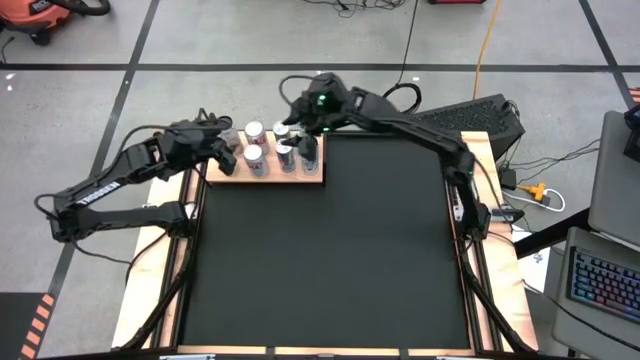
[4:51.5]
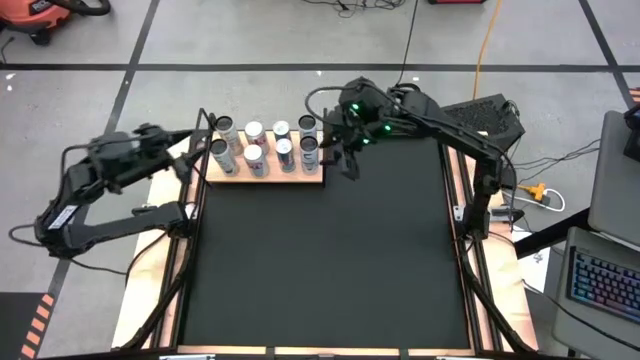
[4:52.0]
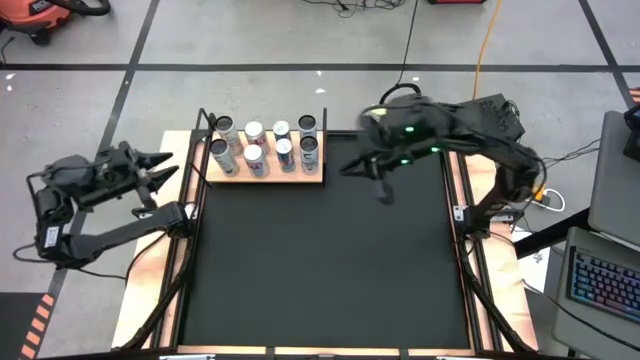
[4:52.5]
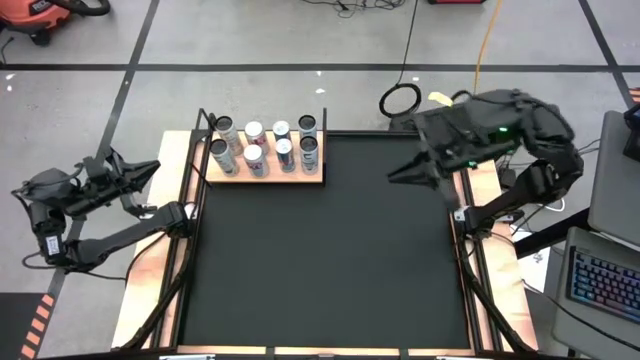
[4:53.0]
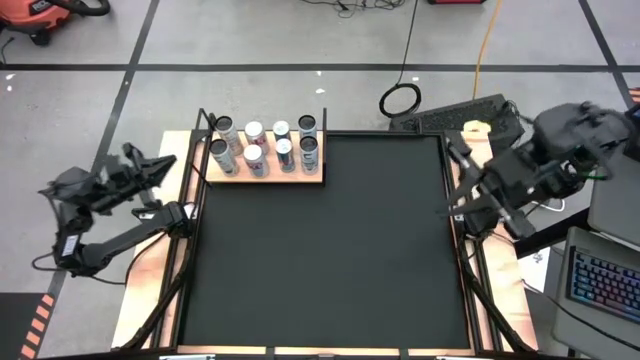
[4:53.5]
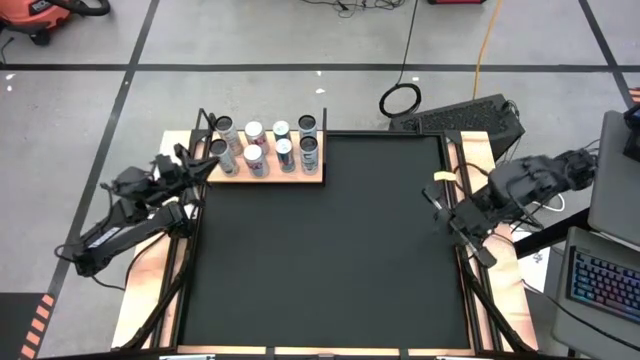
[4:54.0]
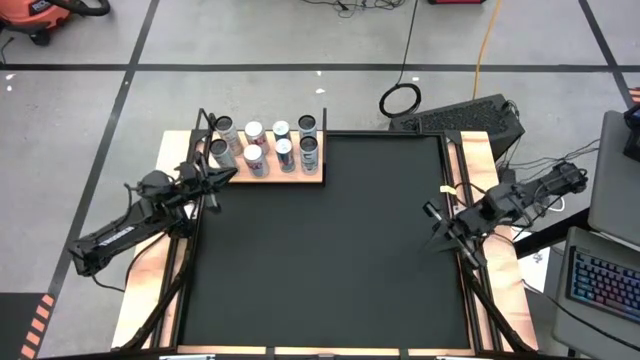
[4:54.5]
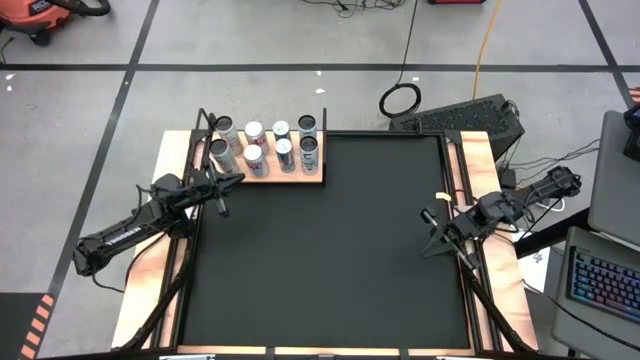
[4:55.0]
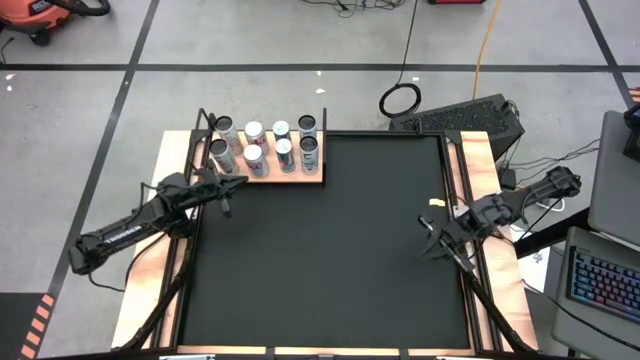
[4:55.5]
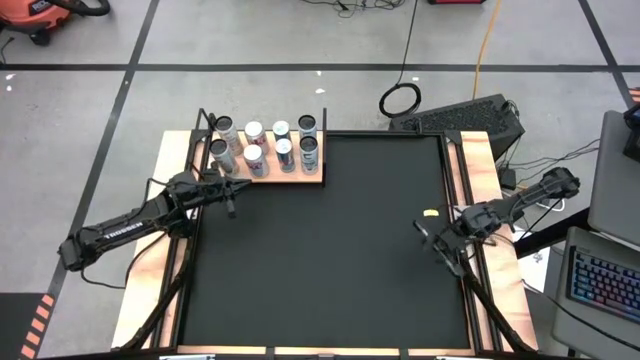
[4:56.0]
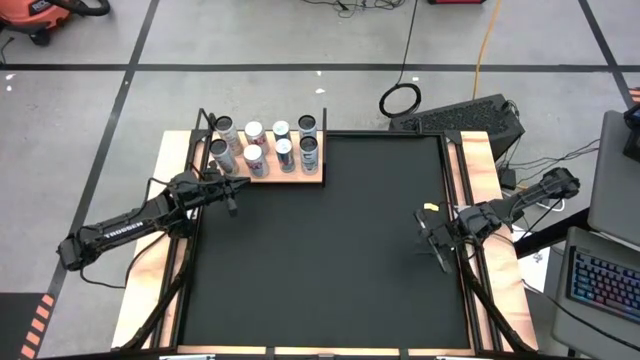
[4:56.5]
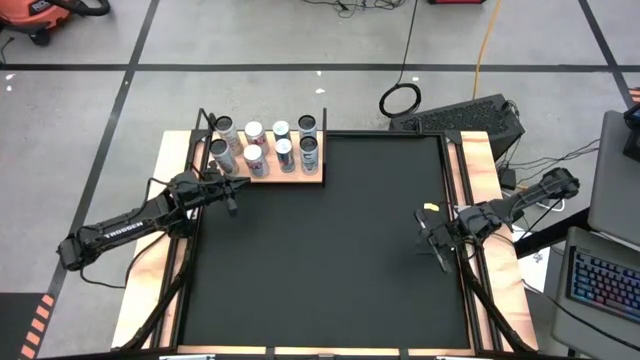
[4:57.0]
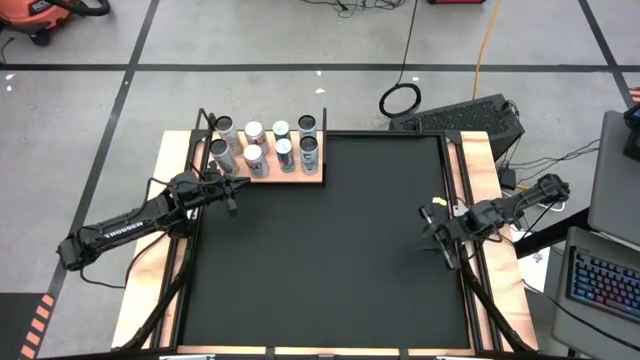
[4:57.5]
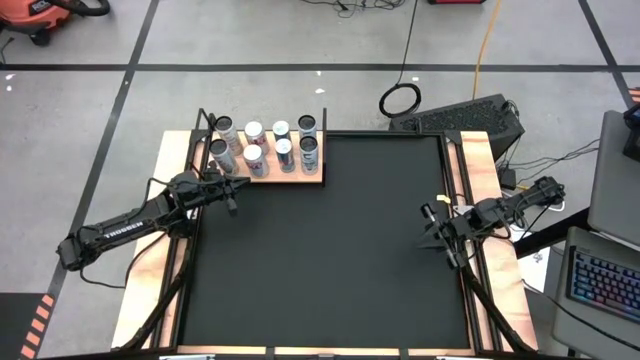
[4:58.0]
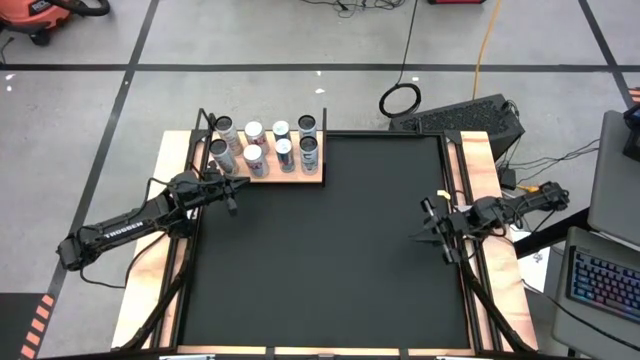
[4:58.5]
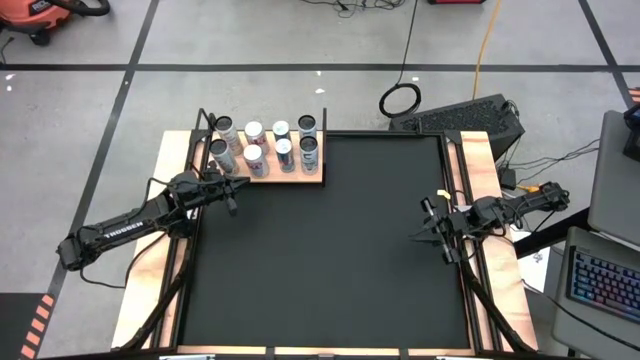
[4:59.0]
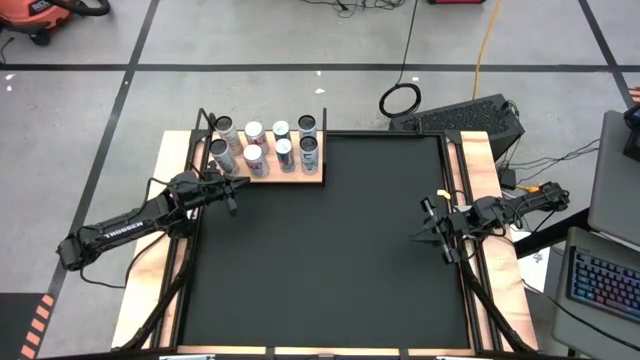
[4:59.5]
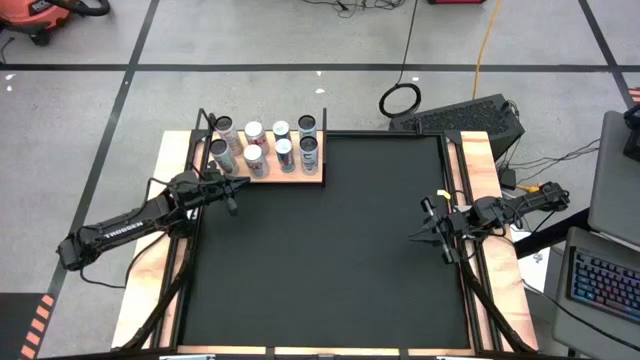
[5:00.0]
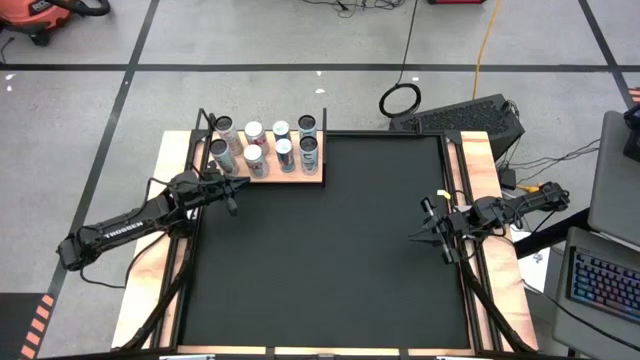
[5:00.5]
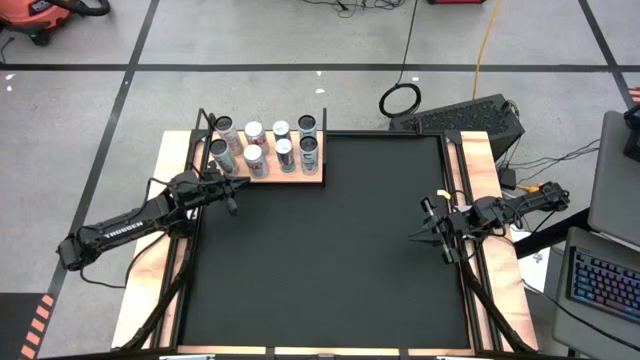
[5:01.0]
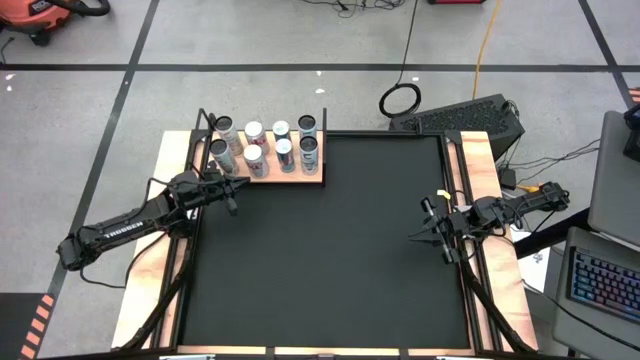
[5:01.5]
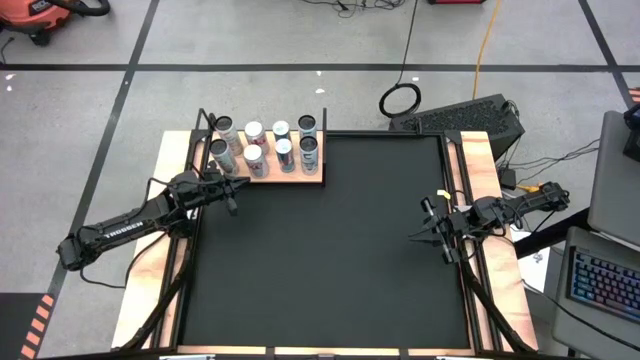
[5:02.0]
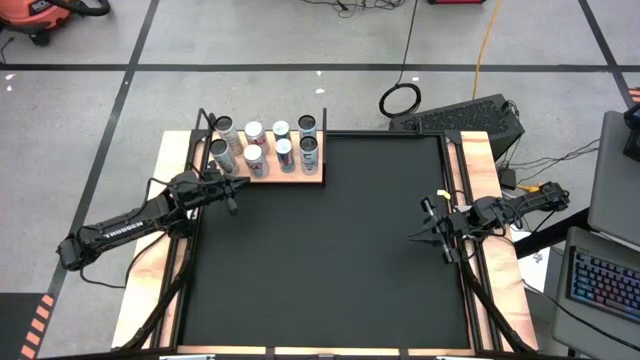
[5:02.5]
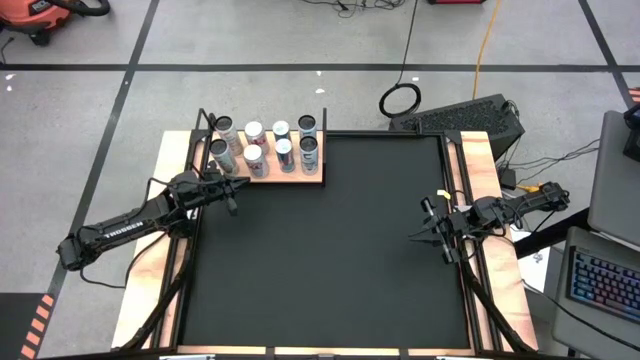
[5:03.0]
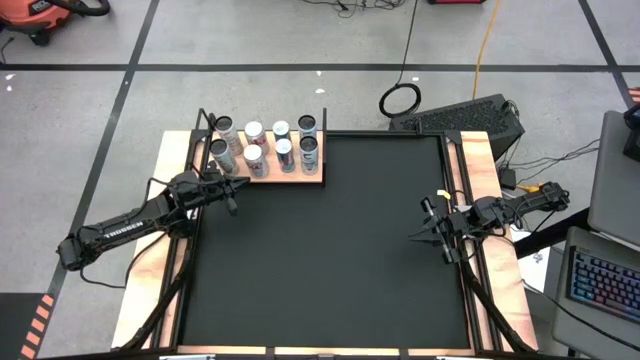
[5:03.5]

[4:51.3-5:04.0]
Task: Place canned beverage on shelf
Return to Home Position

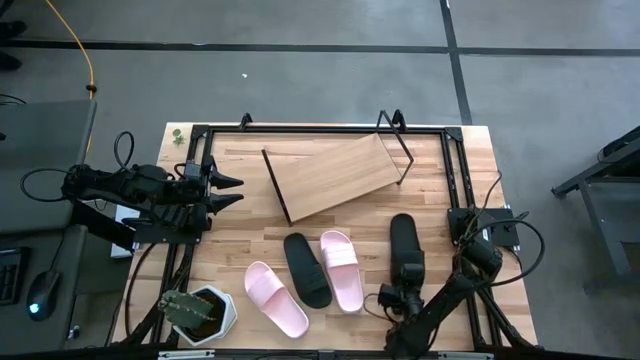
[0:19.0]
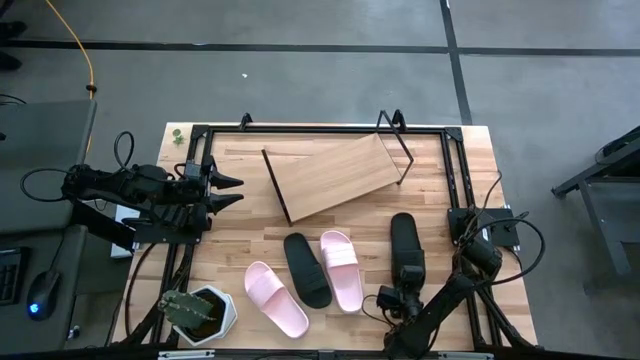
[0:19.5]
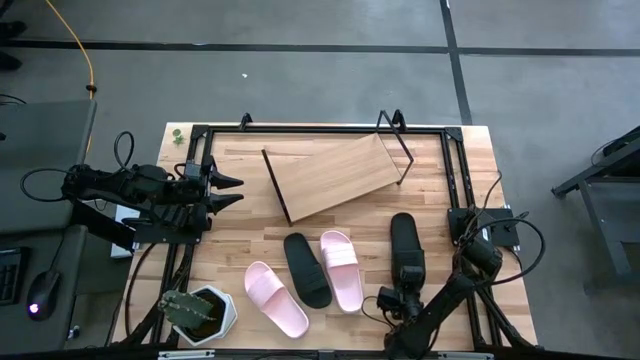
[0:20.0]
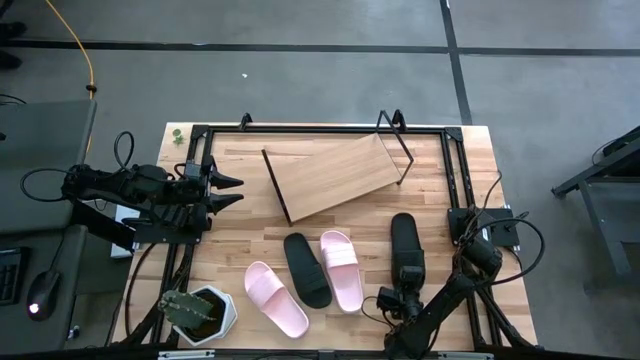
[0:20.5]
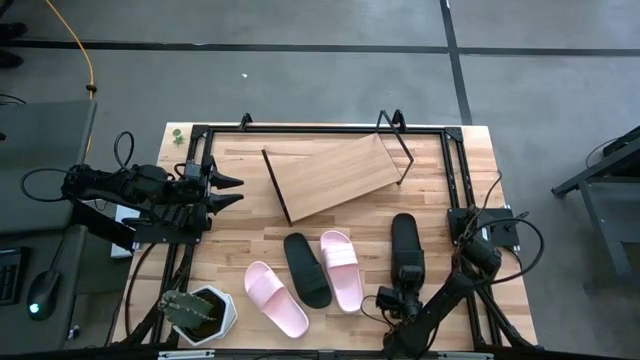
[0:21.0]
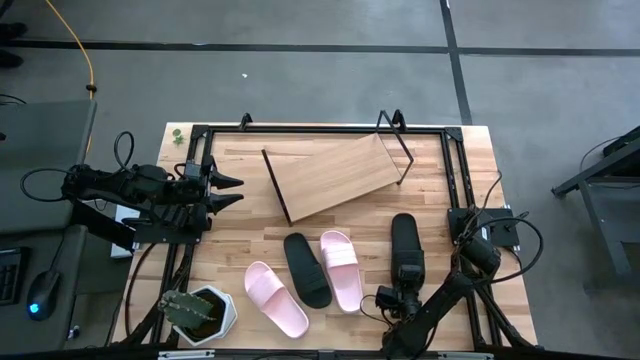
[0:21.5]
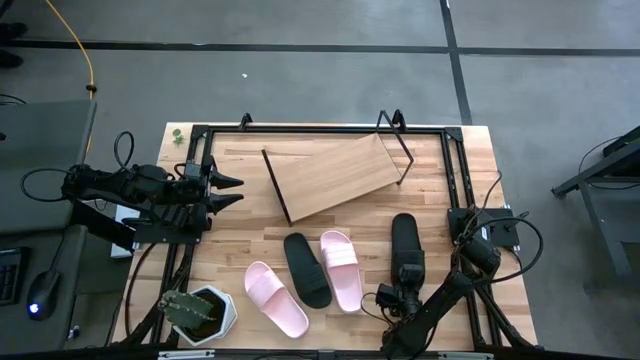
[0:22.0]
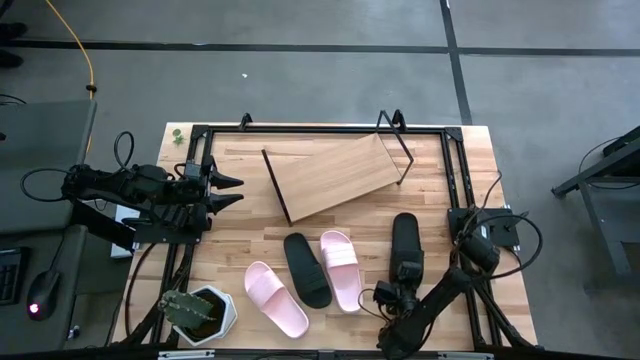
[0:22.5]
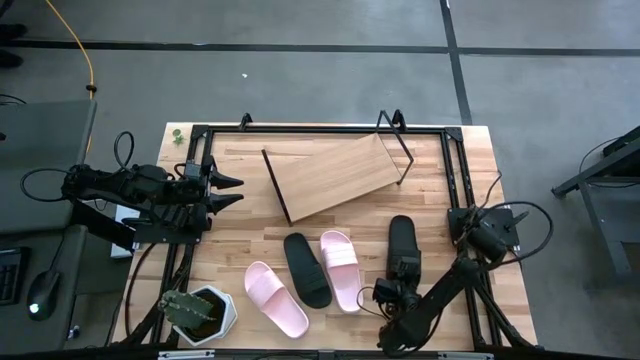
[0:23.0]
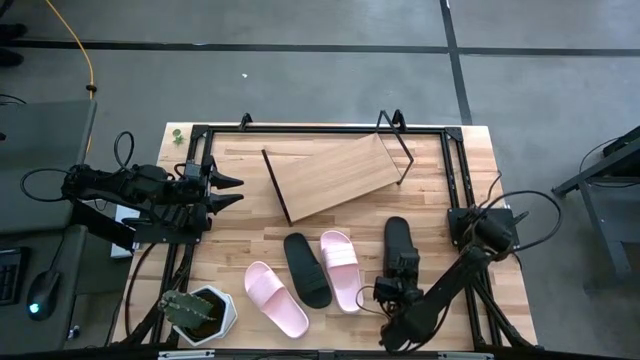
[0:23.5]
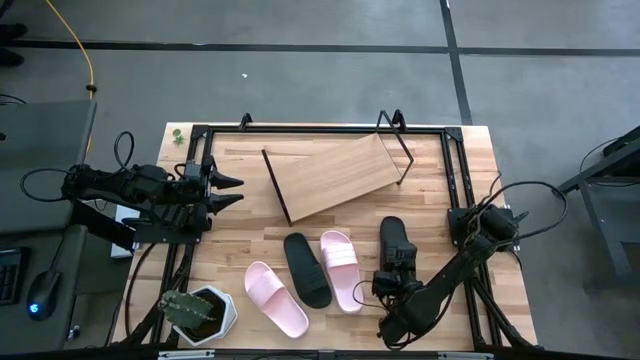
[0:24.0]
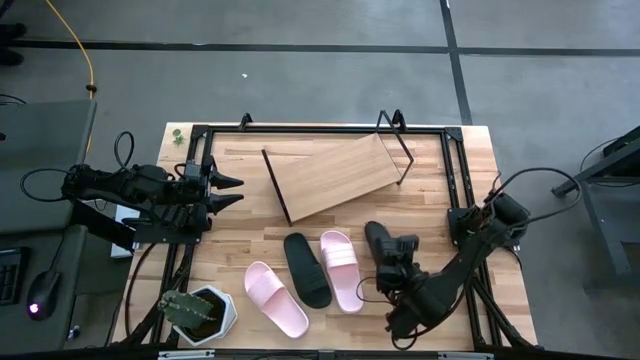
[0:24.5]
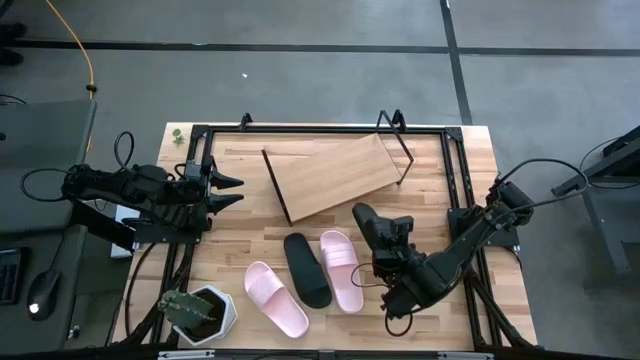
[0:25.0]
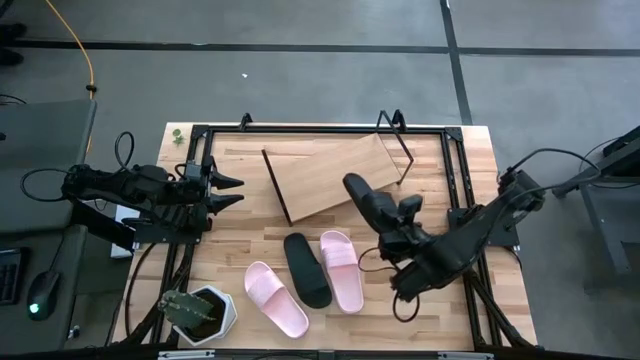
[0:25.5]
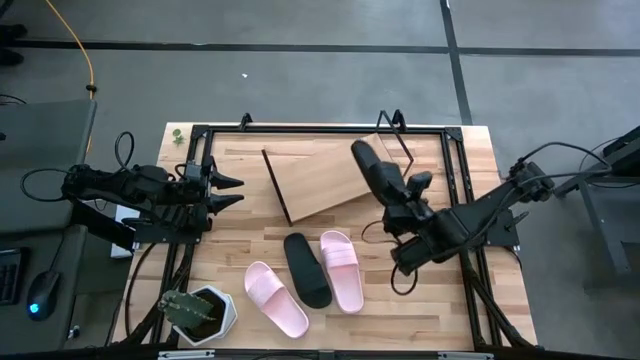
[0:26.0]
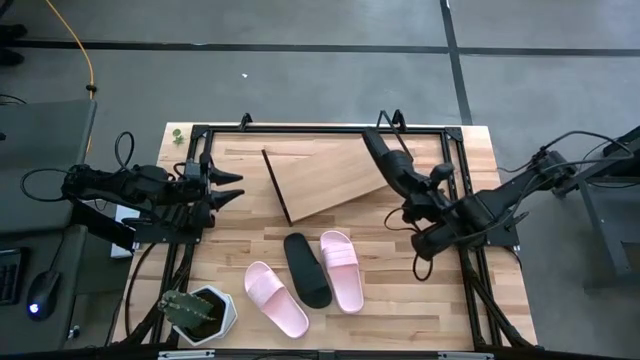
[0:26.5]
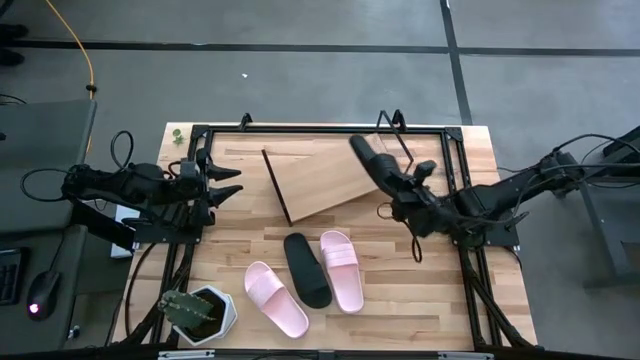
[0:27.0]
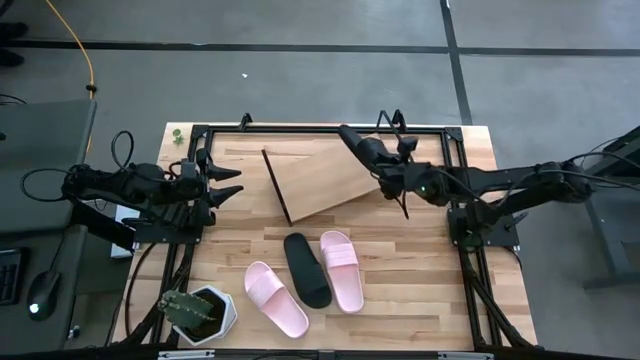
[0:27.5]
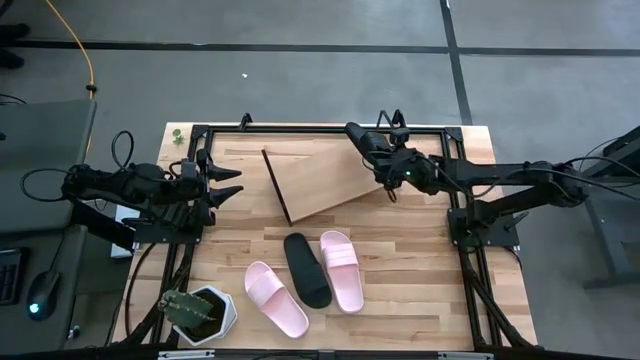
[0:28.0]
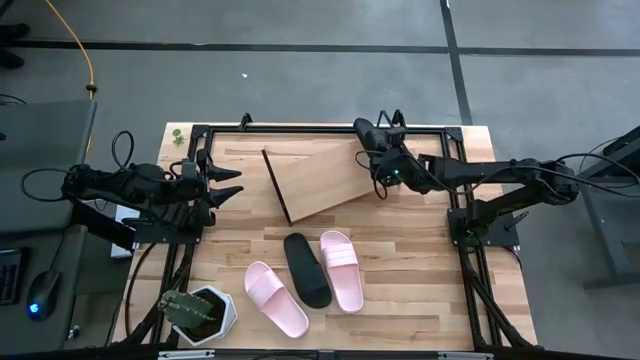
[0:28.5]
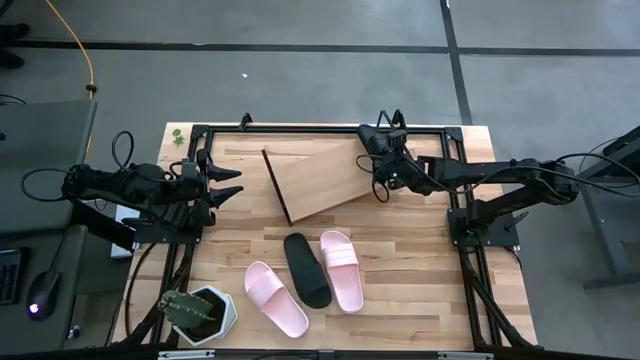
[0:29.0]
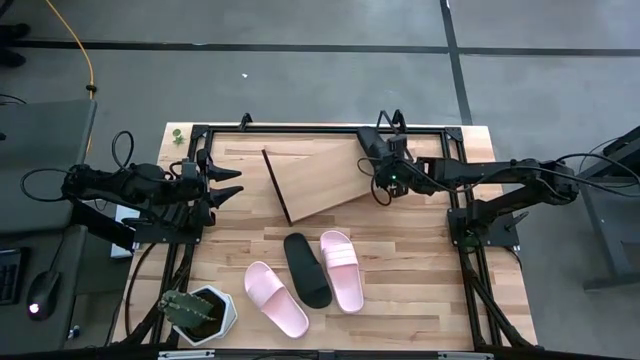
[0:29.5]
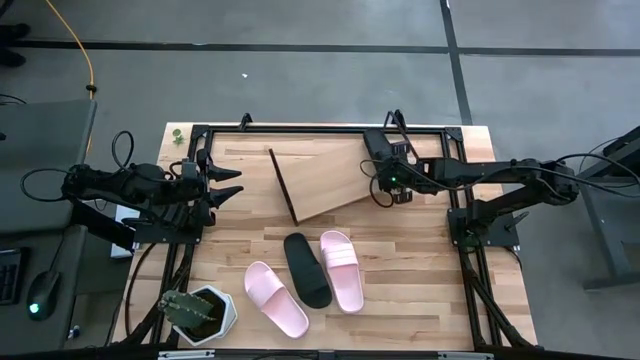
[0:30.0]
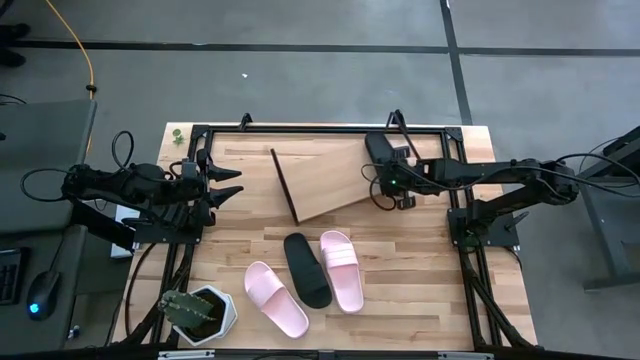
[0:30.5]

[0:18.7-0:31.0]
Task: Pick and place slides into the shelf
Put the right black slipper on the shelf
